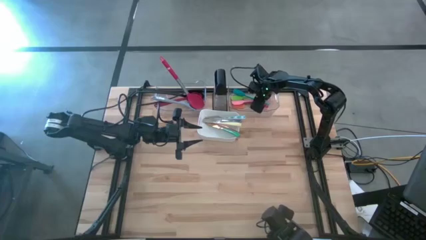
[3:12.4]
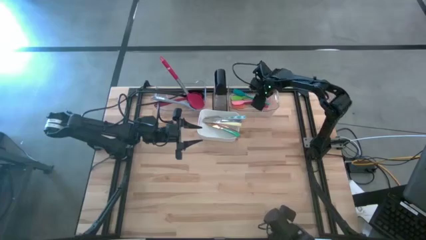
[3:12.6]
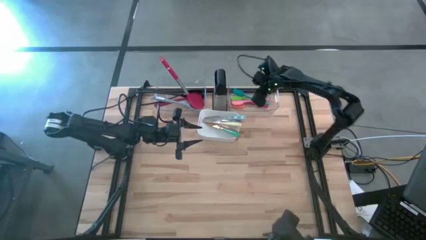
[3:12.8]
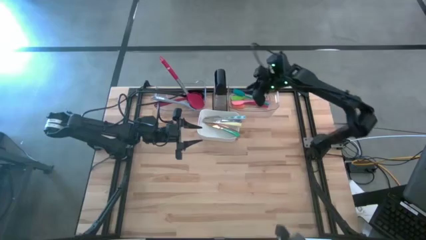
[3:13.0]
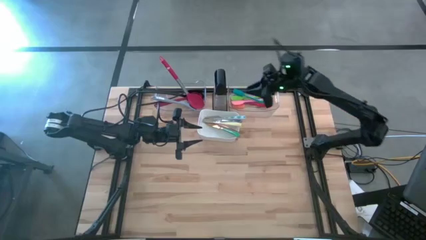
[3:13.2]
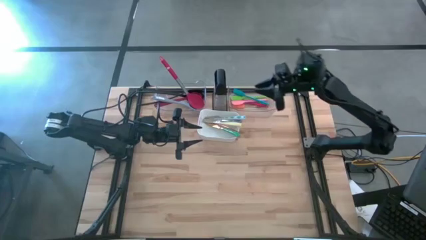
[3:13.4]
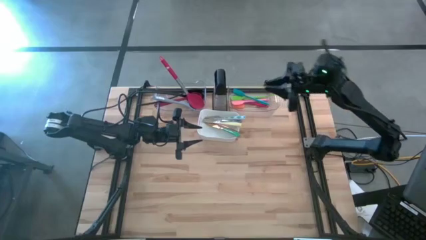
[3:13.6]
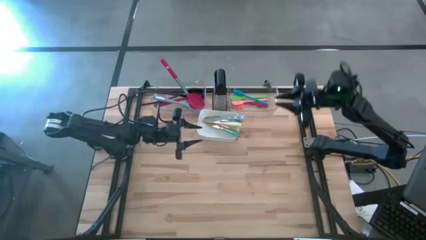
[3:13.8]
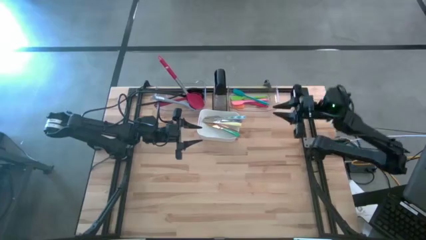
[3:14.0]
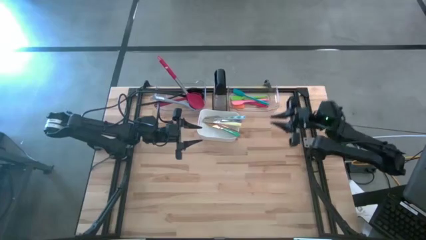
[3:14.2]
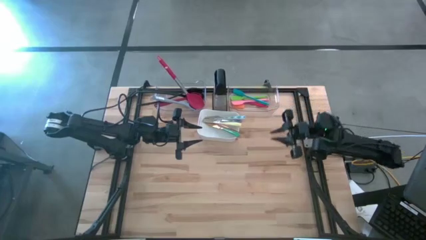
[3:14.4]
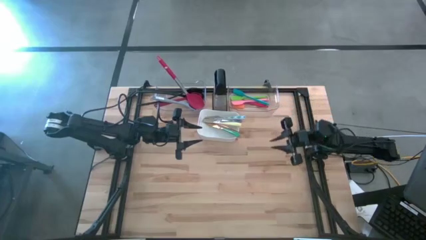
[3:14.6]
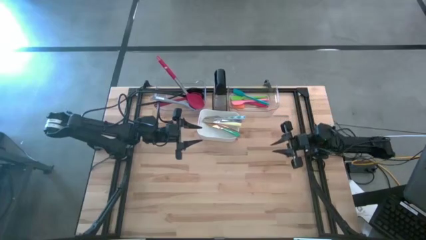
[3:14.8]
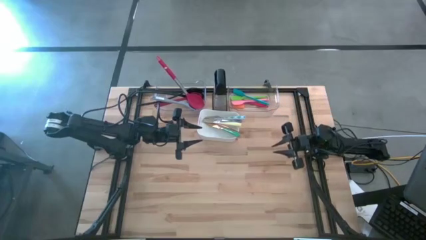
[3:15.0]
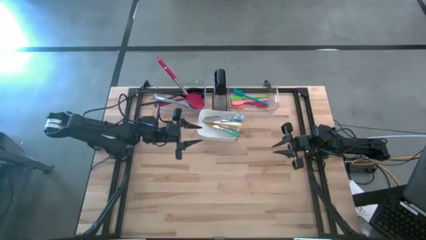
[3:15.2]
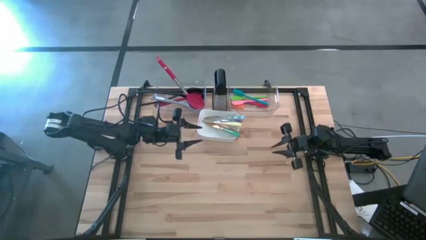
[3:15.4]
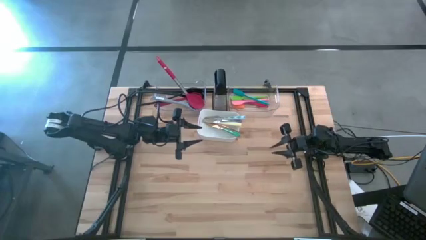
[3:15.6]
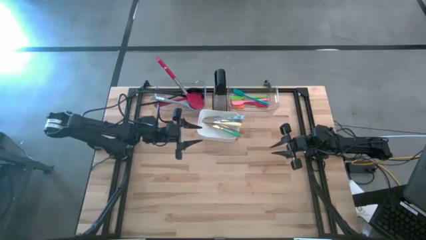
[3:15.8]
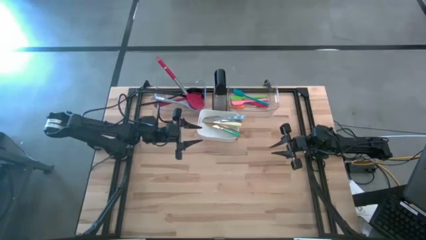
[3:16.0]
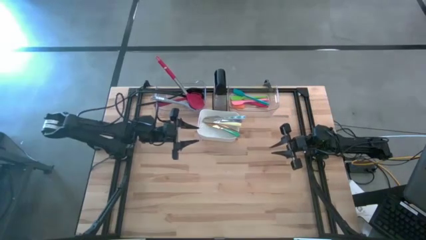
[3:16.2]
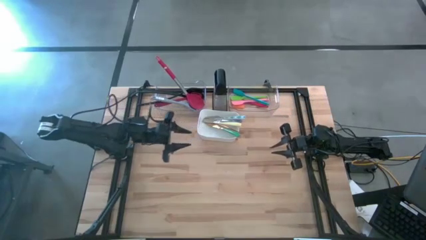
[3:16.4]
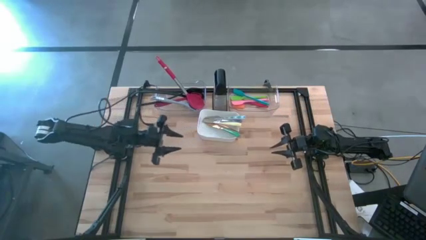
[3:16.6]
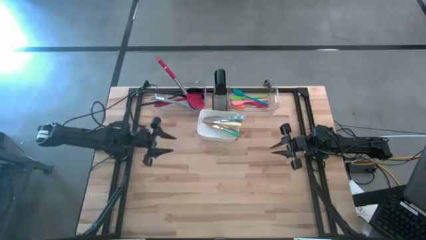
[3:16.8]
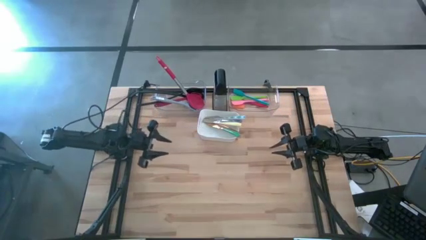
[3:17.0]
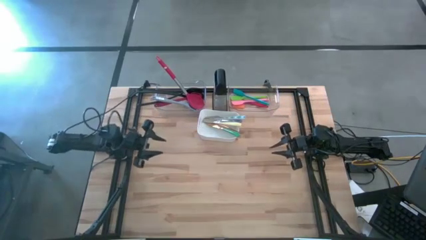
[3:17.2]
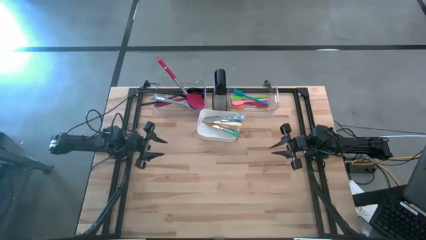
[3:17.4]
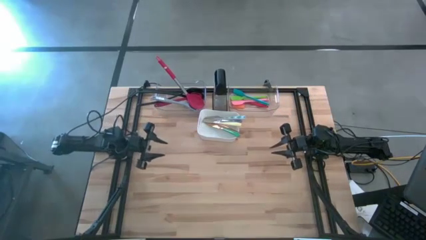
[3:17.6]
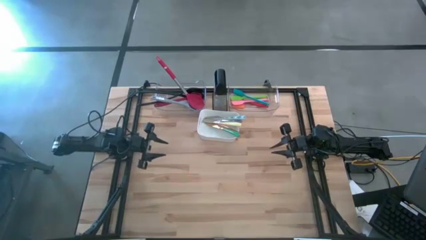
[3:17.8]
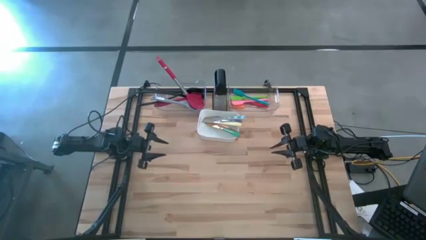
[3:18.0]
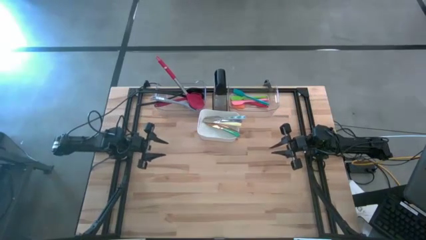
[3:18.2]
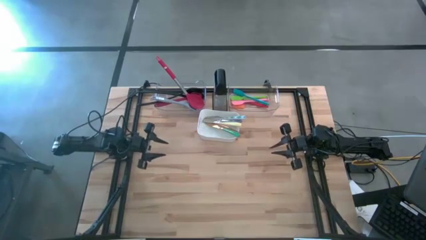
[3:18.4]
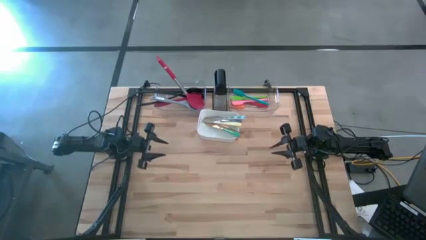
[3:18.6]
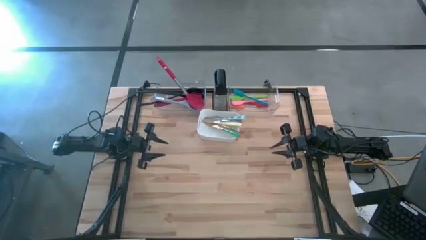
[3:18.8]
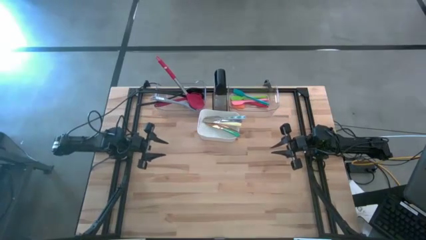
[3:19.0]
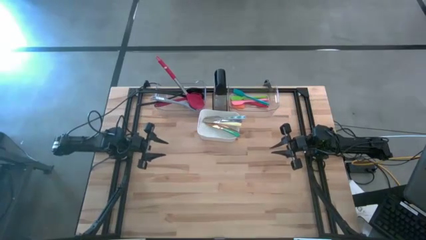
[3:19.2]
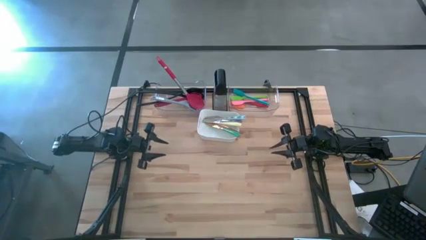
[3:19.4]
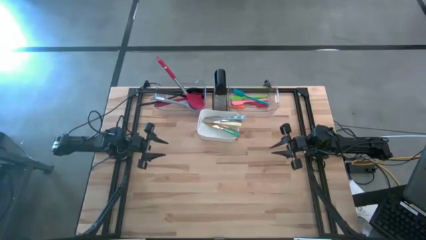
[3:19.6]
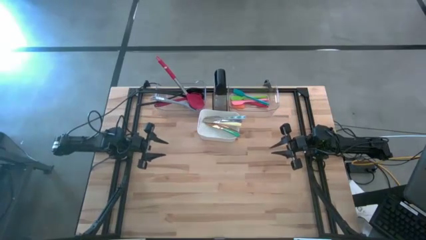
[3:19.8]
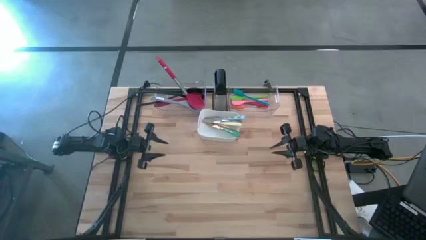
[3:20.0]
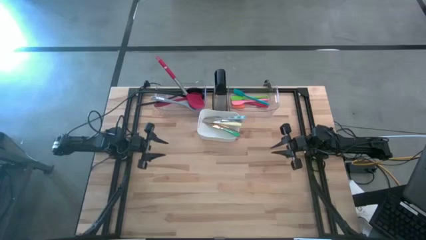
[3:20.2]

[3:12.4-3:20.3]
Task: Pick & Place Kitchen Items
Return to Home Position

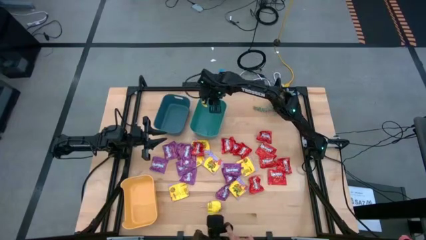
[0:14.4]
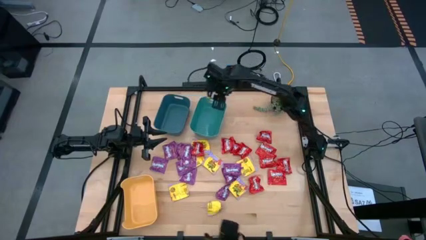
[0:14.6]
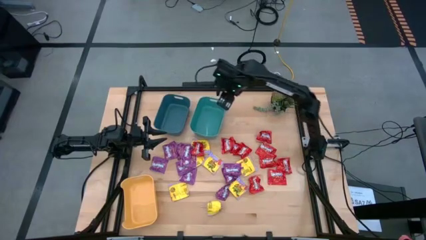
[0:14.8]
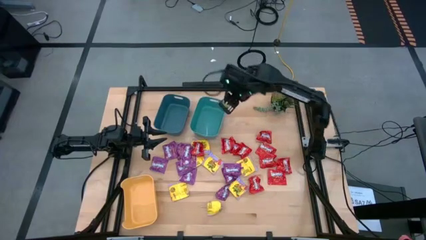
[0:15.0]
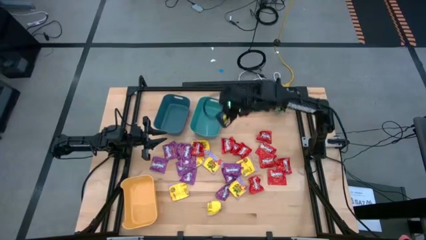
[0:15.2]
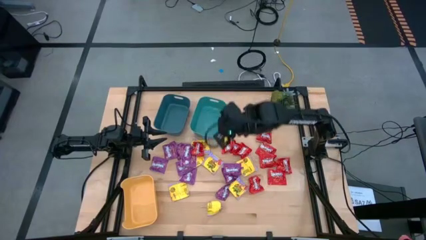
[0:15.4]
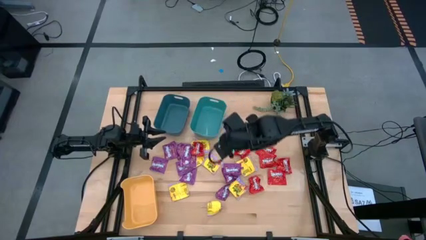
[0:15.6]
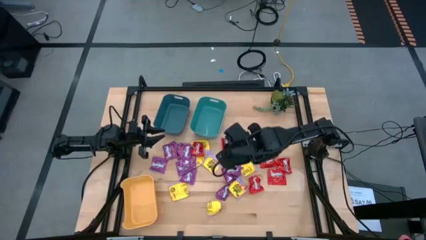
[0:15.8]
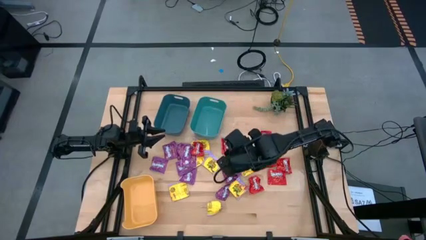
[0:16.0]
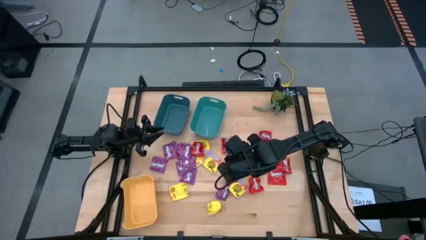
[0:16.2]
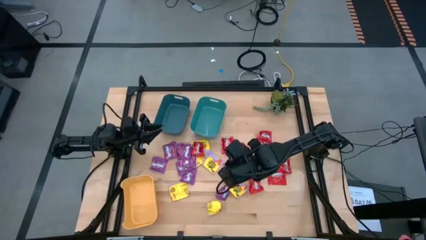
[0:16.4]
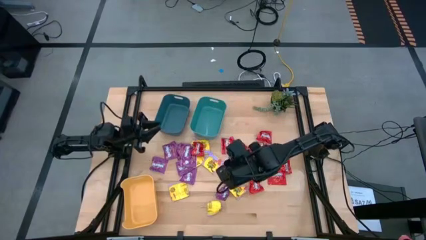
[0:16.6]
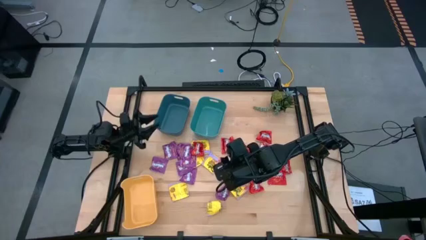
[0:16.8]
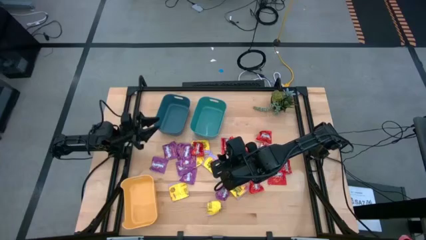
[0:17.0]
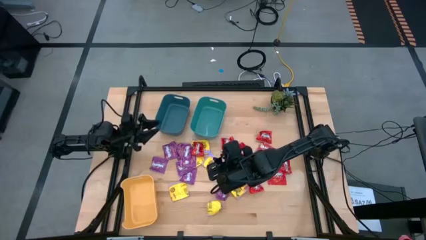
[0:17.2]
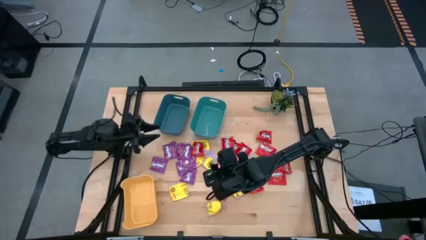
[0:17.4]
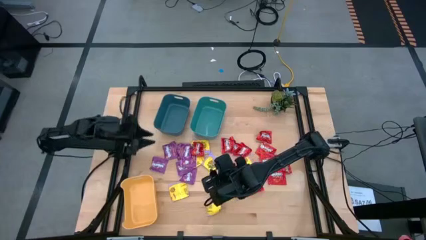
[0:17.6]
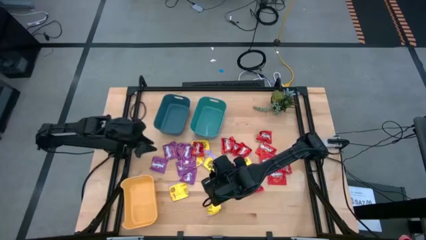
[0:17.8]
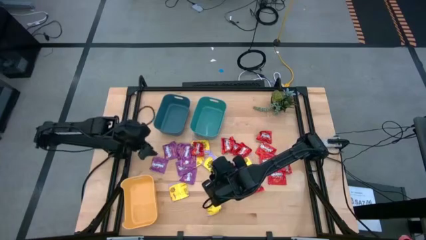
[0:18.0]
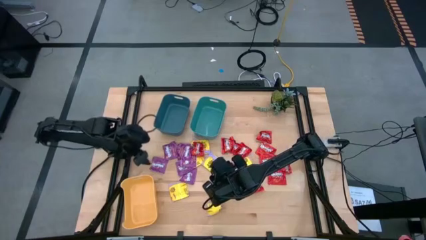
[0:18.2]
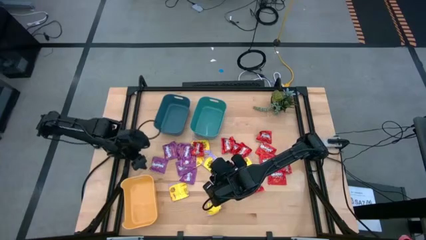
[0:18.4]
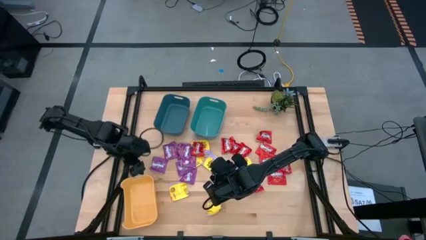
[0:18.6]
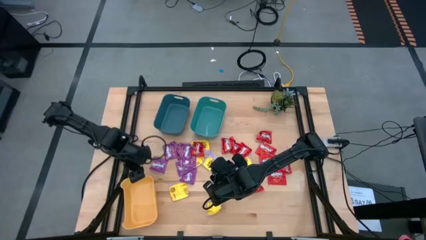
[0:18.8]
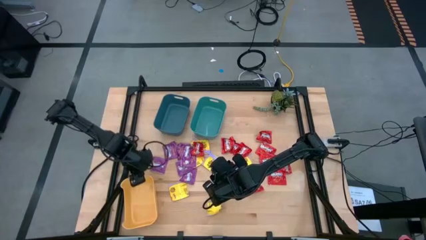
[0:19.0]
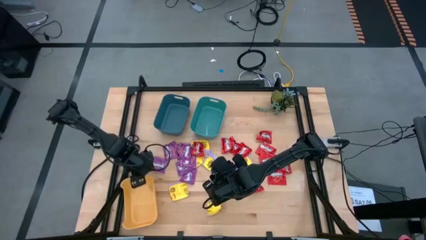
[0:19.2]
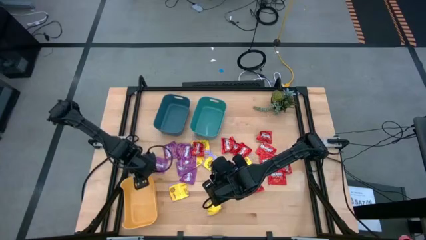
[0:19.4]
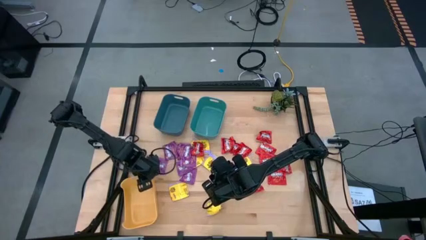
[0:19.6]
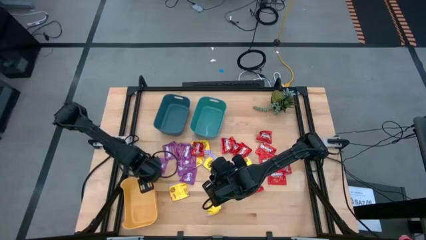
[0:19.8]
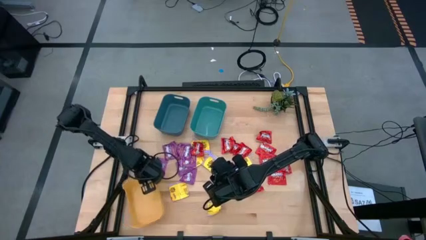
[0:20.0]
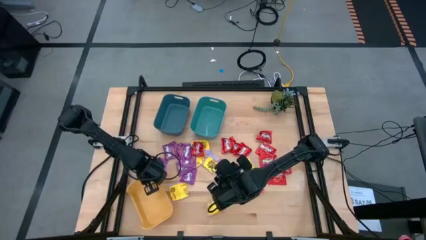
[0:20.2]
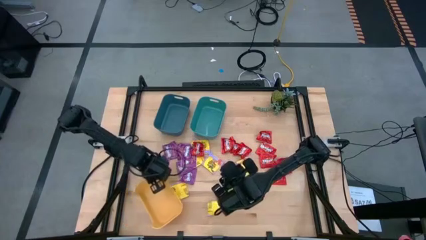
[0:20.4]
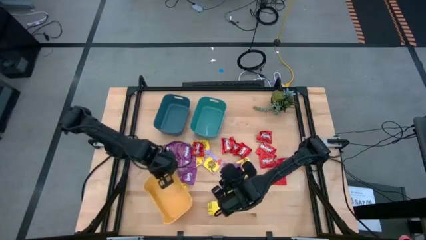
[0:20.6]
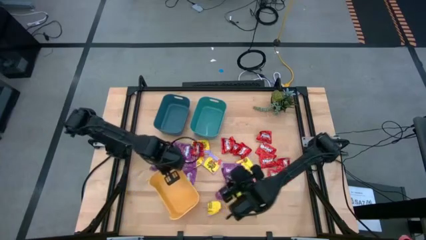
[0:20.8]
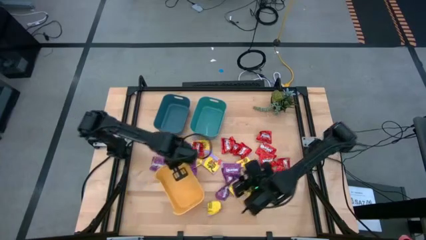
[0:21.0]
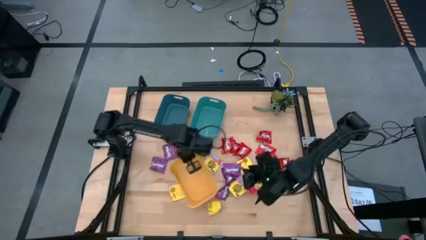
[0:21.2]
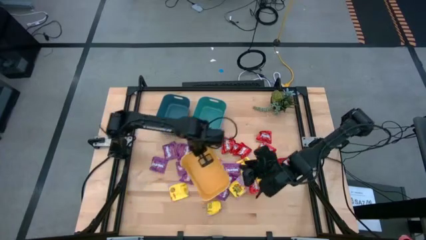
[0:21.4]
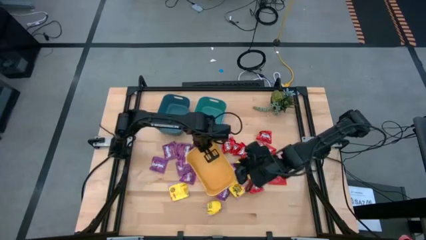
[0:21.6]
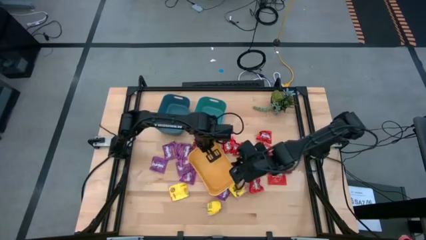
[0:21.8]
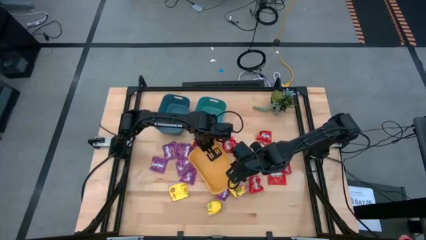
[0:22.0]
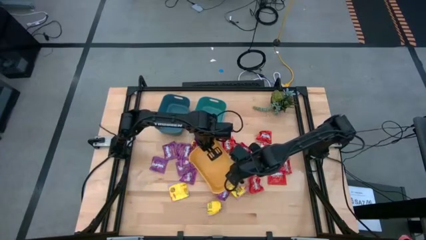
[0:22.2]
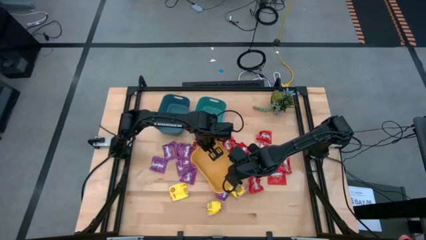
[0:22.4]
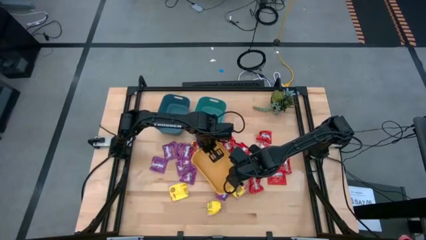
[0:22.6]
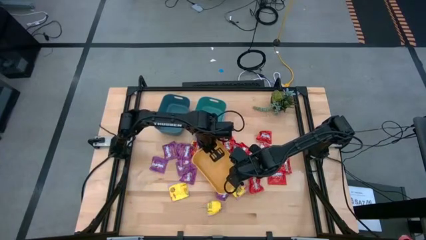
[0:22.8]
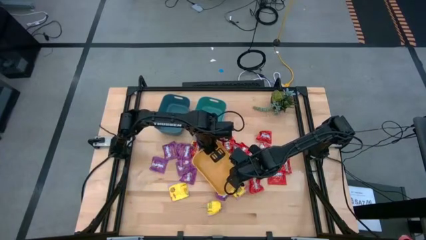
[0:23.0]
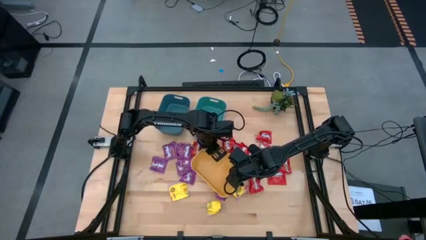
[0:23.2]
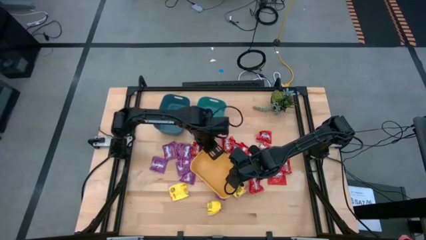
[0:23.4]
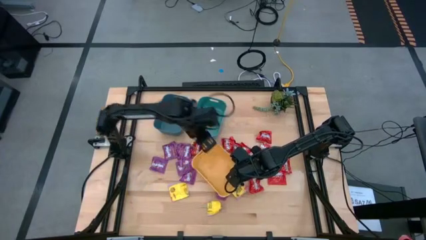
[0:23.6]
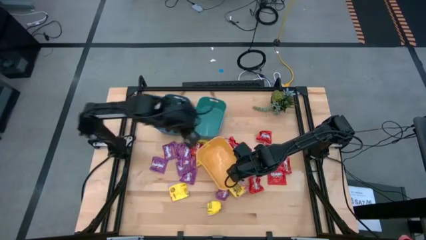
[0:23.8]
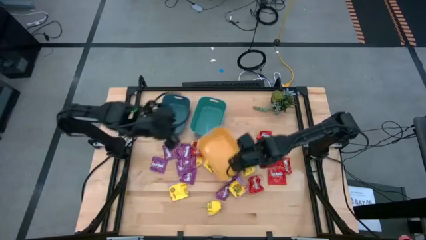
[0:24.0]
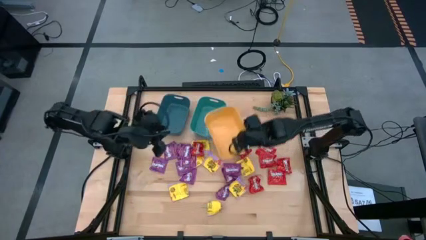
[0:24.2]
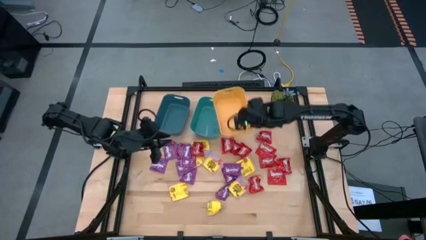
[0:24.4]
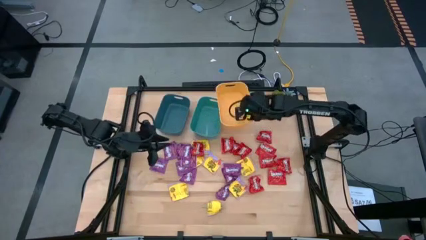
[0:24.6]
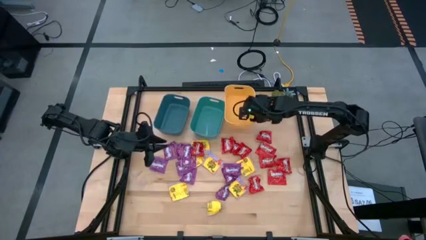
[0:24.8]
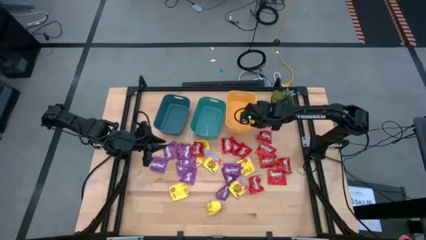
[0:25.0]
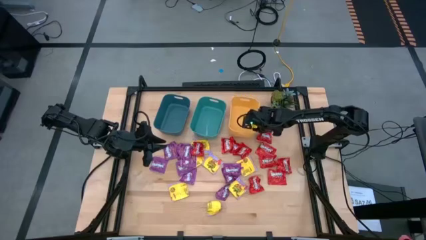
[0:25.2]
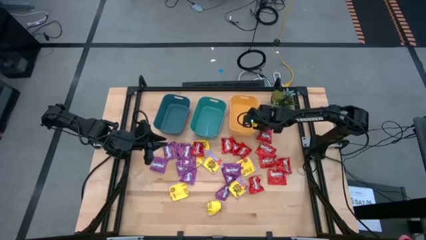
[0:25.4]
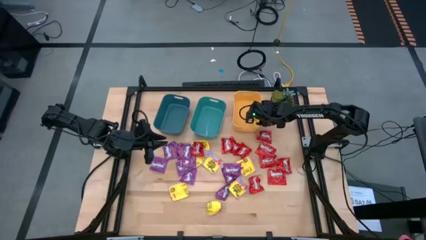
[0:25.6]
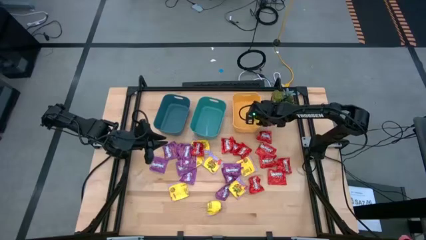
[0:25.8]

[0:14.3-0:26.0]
Task: Sort candy
Move the yellow bin to the top right of the table
